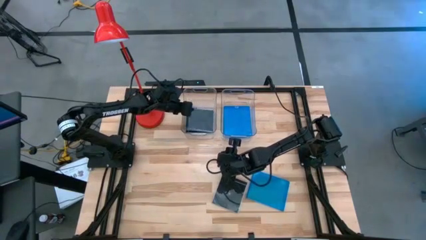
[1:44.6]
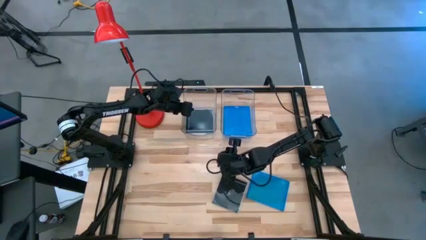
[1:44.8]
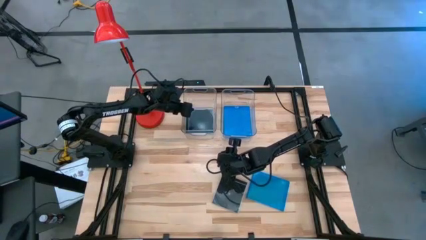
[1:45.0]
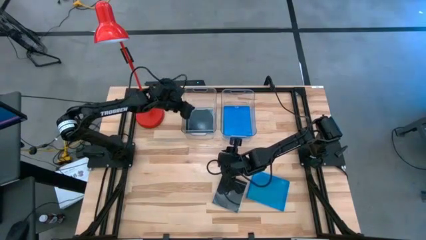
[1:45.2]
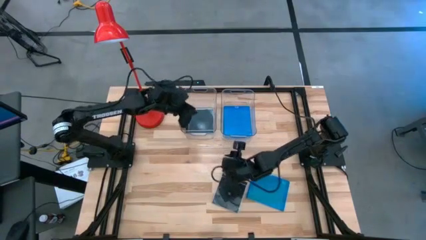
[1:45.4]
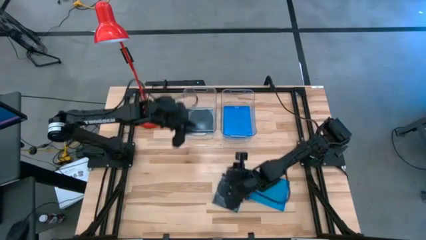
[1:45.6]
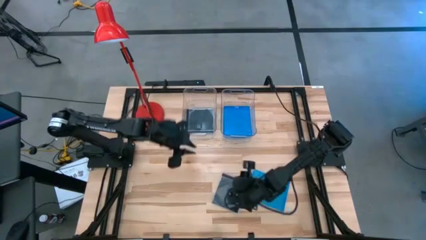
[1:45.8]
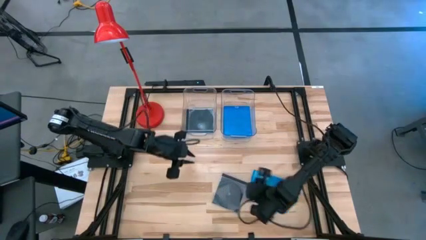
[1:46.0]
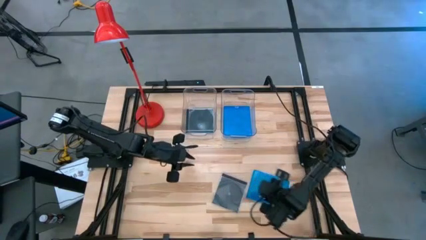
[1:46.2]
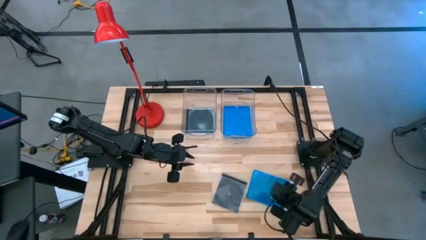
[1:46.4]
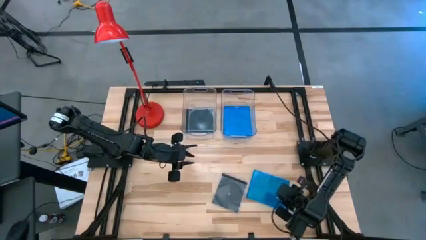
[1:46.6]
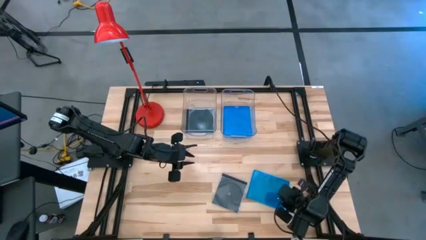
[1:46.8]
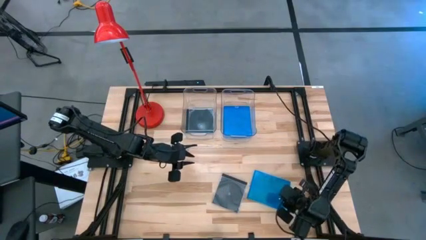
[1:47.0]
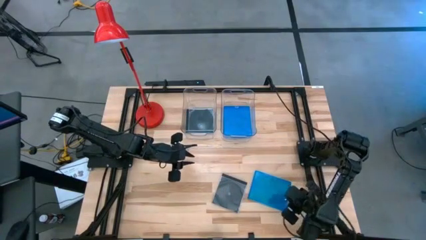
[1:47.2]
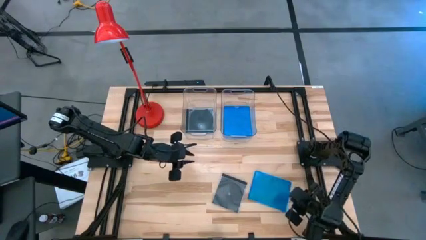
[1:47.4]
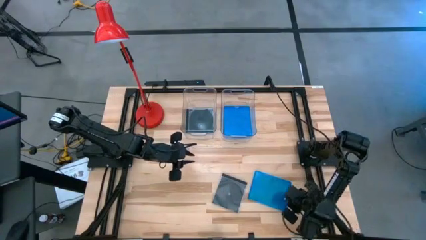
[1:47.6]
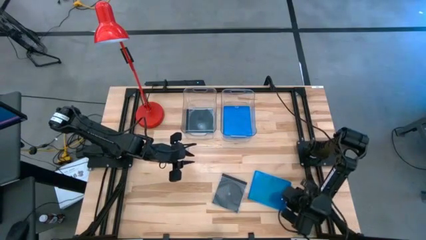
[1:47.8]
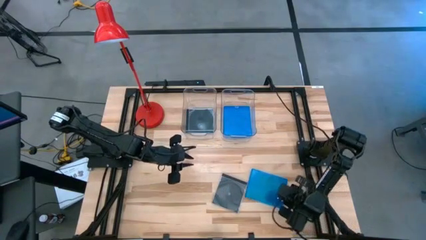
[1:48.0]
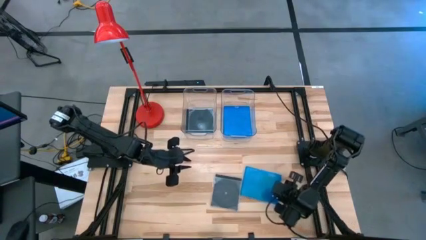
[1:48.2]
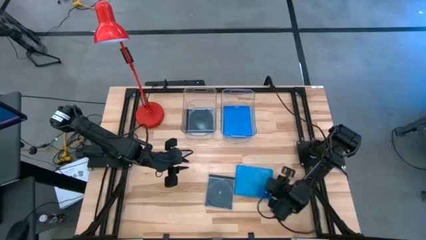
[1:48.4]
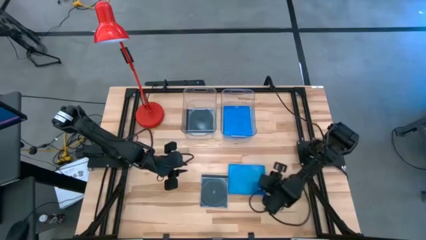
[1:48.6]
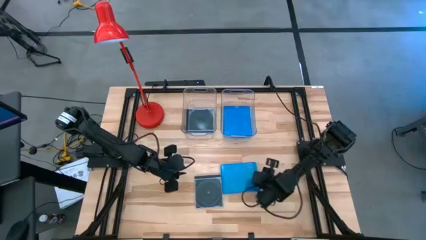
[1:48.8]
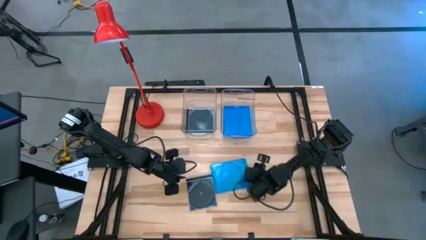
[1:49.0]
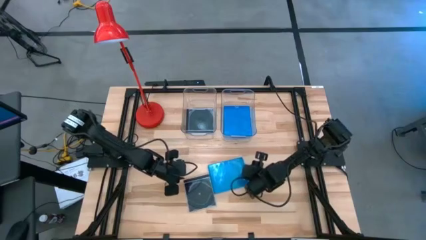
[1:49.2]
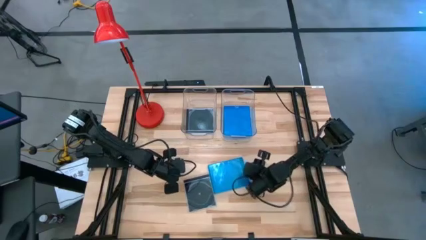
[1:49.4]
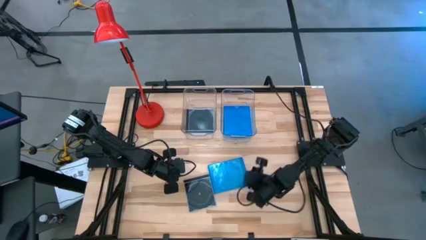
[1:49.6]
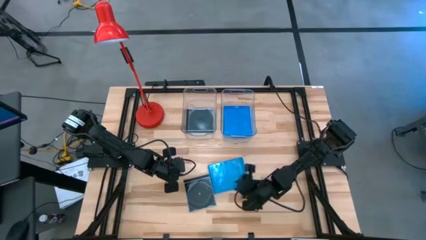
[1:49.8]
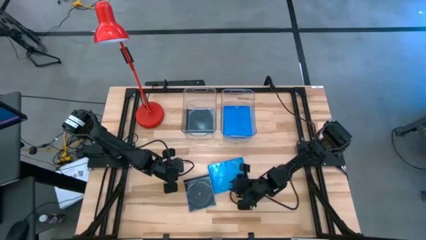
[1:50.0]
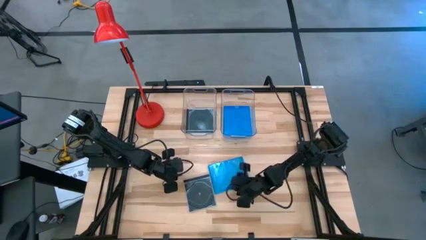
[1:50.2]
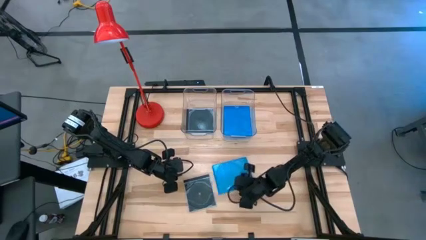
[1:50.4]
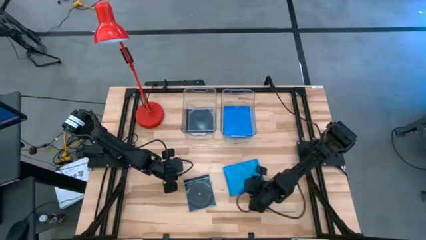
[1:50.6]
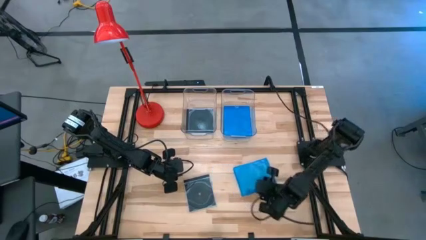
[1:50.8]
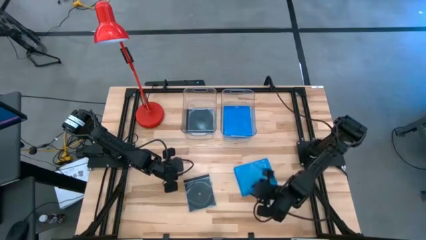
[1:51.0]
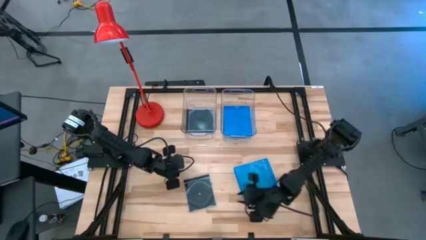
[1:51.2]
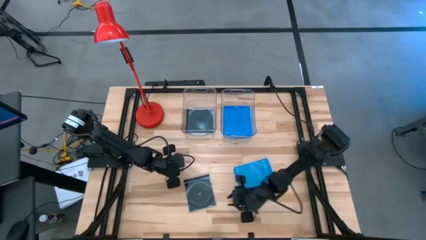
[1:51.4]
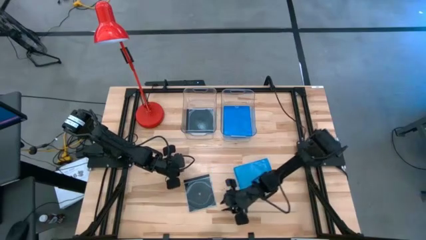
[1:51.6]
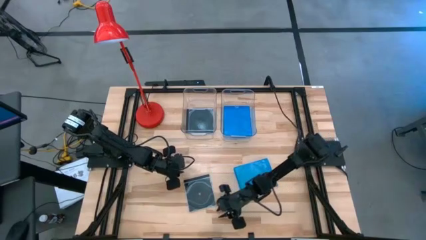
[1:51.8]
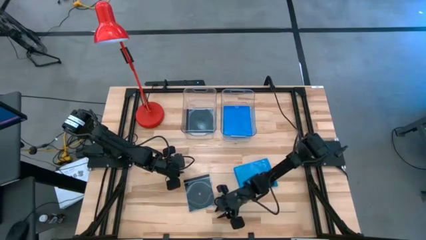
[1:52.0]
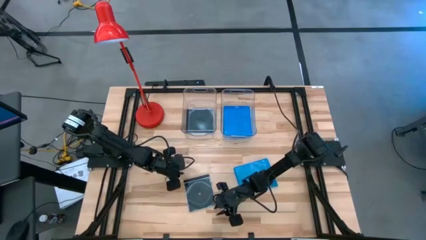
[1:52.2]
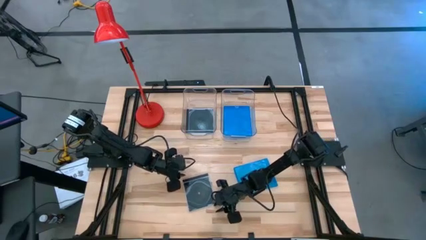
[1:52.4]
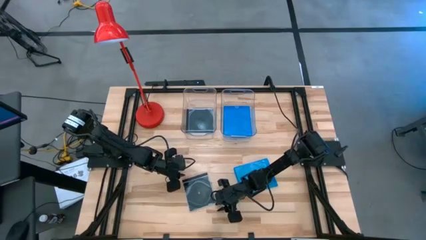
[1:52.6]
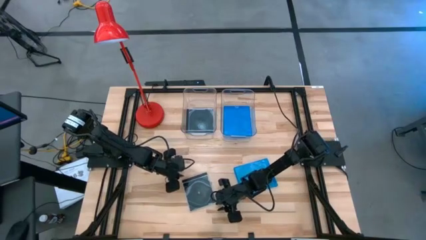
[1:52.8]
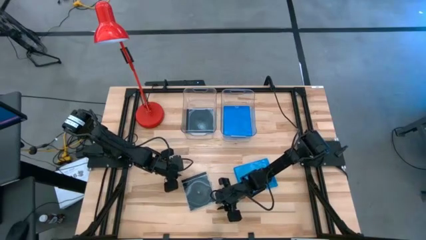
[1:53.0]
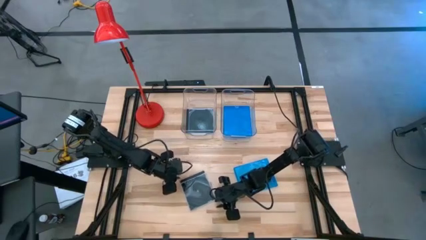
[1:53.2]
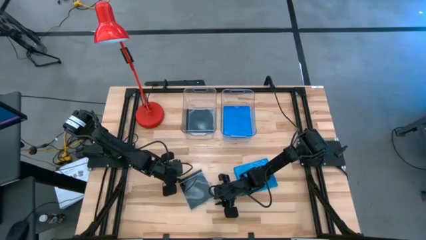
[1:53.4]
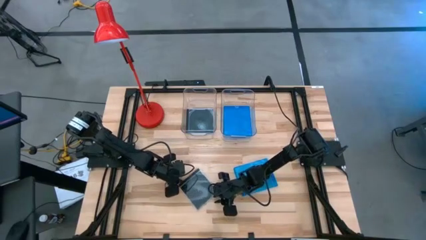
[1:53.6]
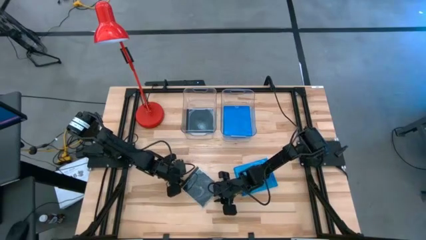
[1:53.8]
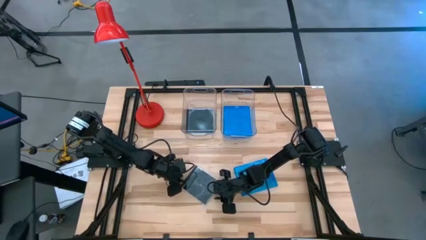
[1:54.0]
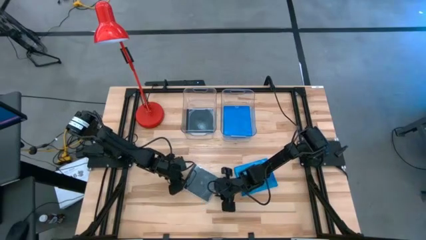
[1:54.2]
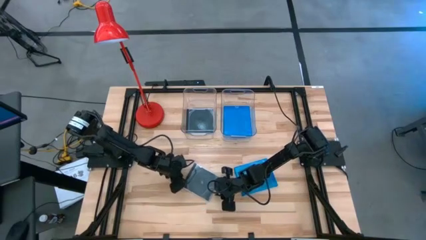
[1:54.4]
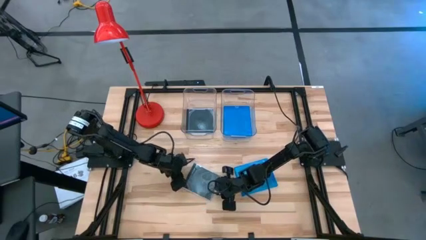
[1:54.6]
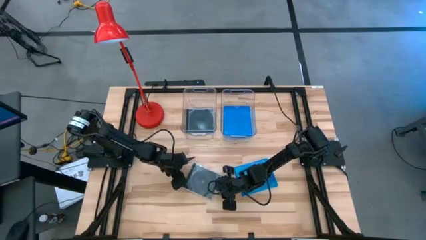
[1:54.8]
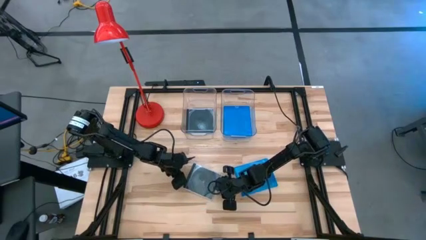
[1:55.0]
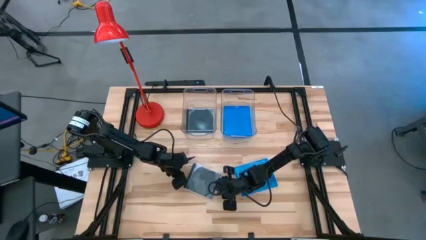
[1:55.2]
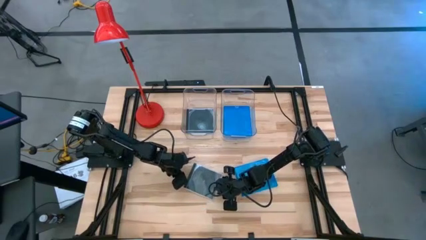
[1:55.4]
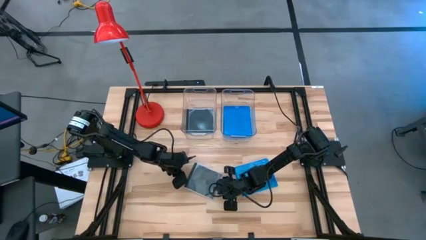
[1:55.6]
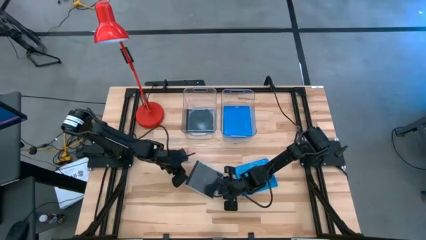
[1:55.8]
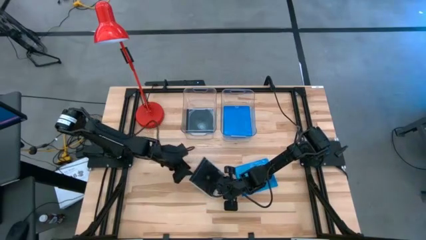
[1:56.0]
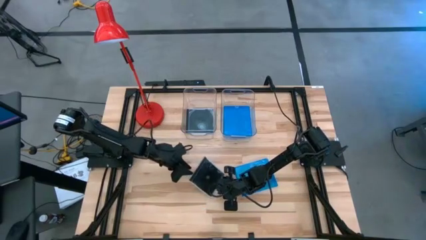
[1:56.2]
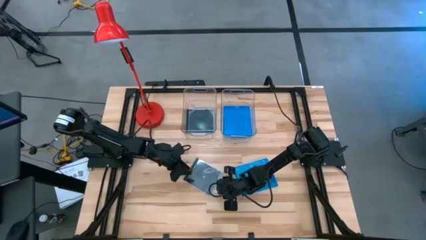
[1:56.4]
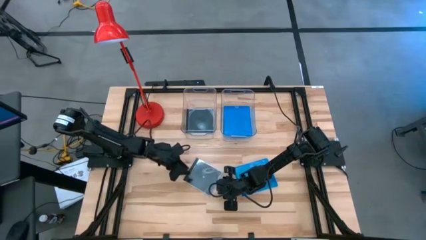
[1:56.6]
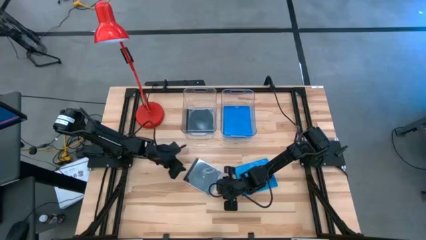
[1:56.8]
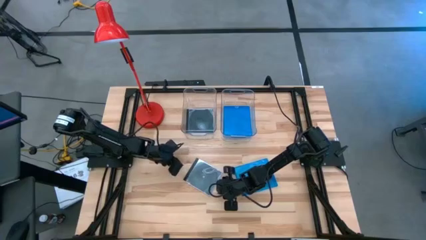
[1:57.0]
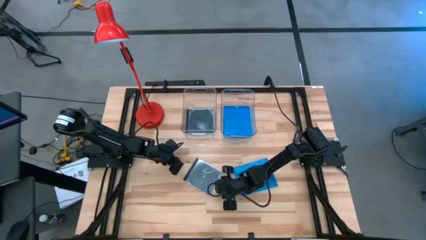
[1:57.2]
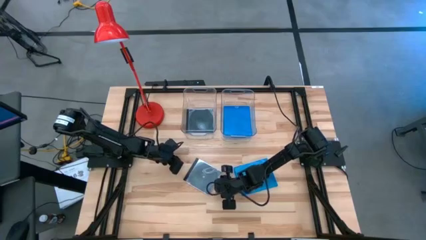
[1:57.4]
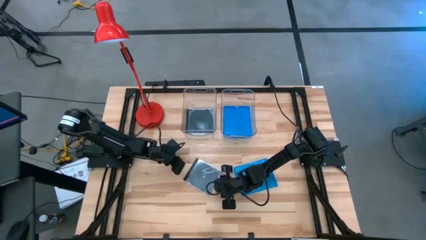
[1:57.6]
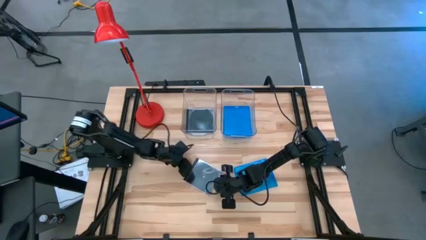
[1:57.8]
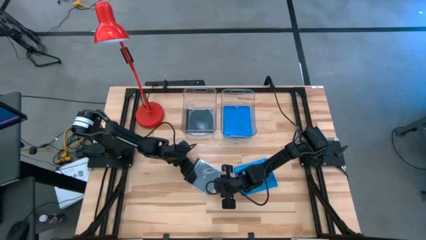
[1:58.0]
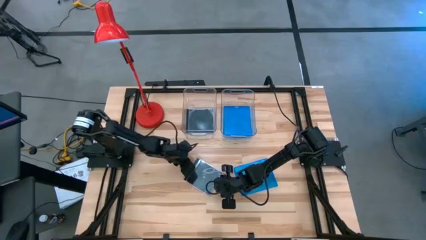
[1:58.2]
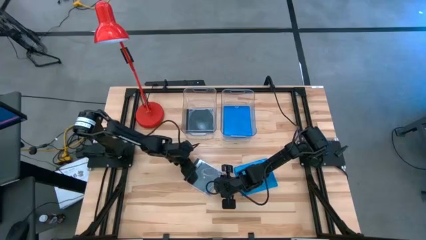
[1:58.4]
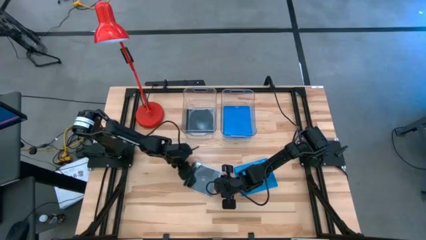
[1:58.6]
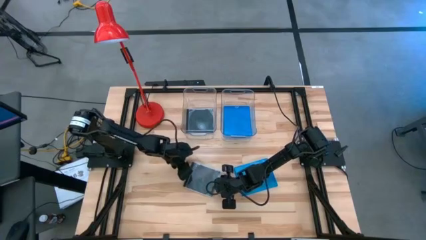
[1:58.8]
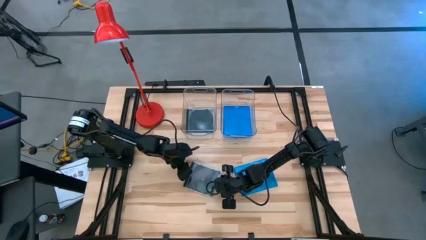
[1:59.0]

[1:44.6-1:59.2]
Task: Pick & place jewel cases by type
Put the black cd case into the left transparent bin

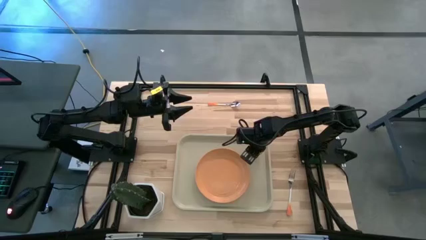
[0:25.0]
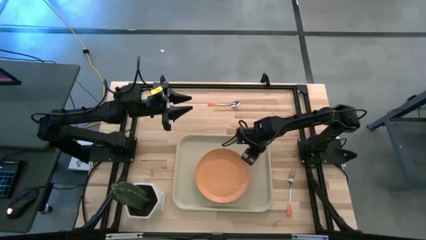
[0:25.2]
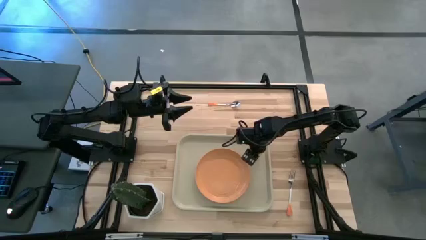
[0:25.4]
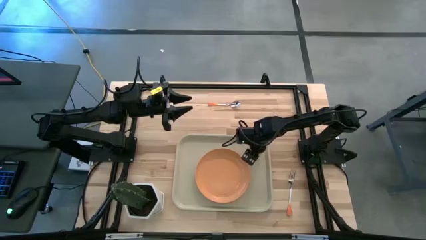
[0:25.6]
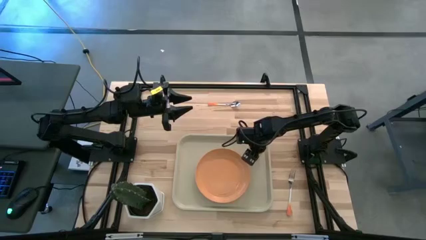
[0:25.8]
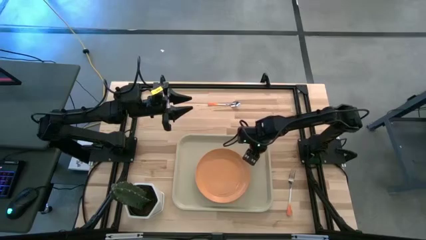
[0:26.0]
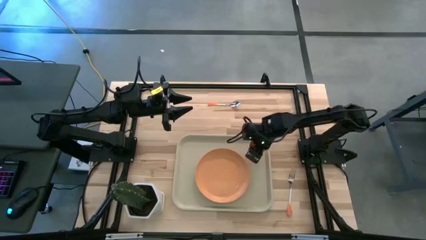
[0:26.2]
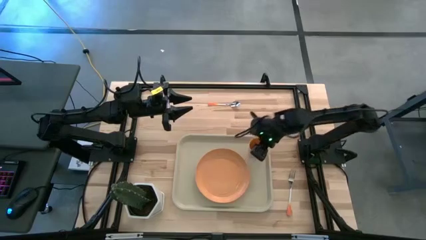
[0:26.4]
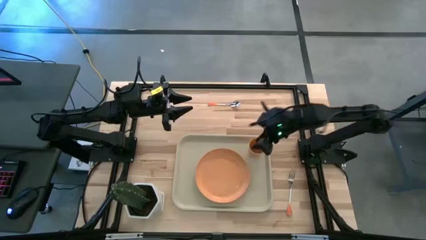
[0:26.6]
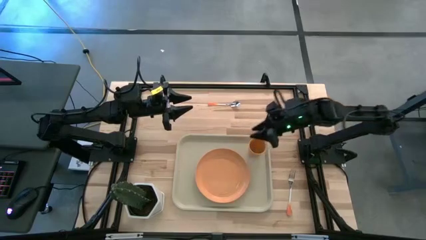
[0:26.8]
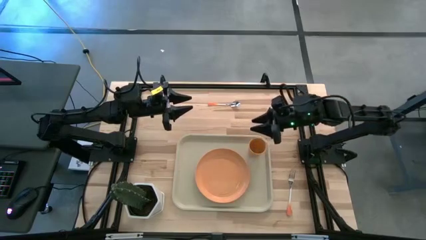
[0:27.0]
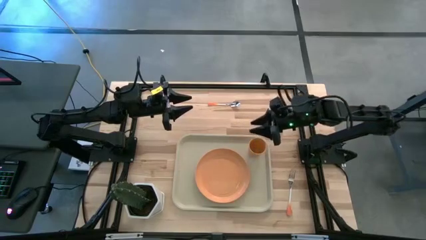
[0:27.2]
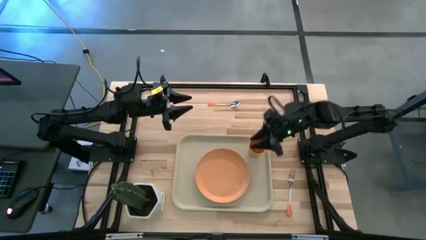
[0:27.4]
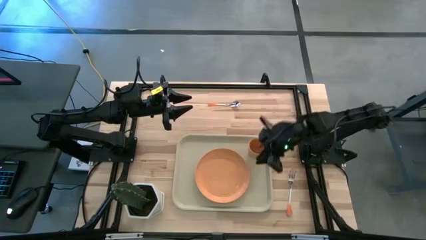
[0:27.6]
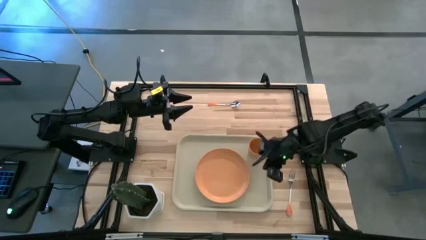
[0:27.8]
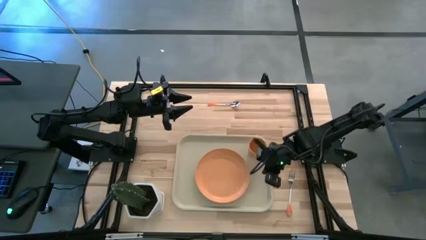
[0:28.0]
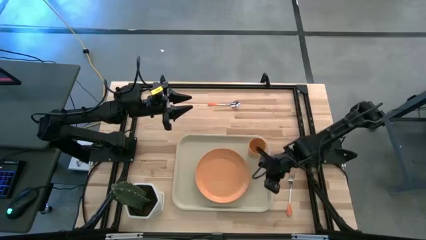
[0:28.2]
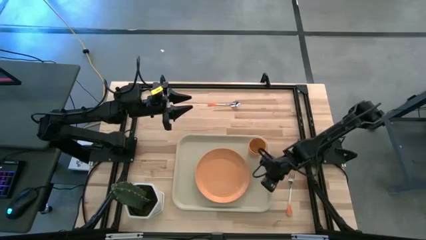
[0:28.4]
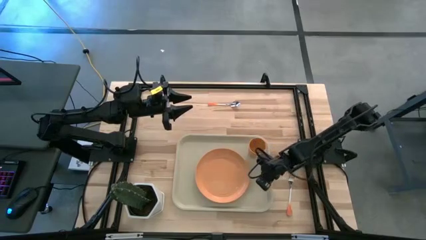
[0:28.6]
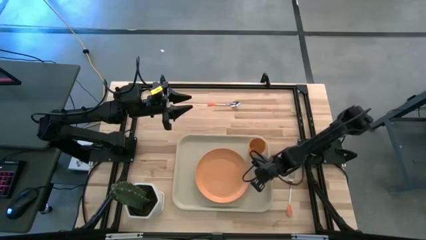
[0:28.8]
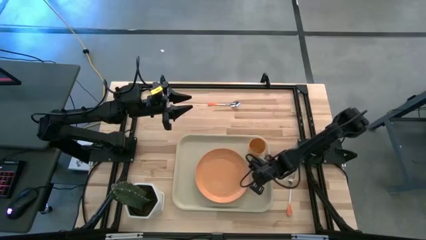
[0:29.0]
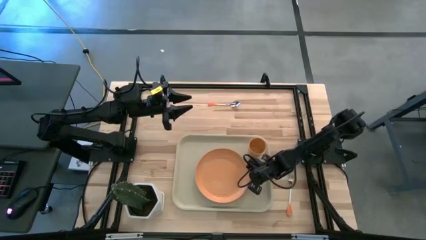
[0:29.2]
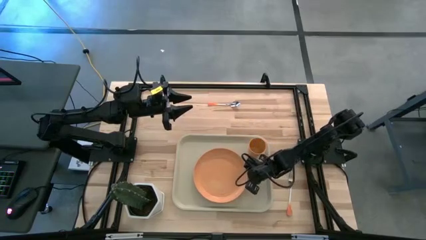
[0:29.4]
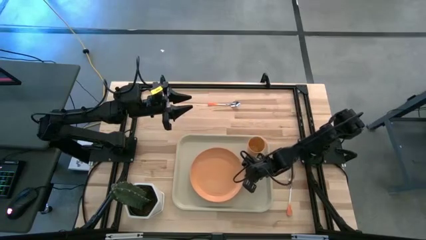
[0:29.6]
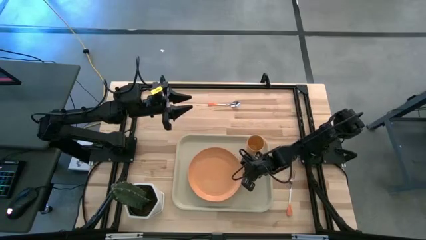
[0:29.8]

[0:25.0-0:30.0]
Task: Pick and place plate/cup/fork/spoon on tray
Adjust the orange plate on the gray tray
